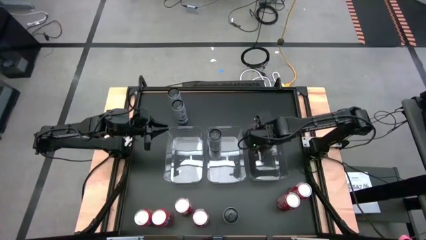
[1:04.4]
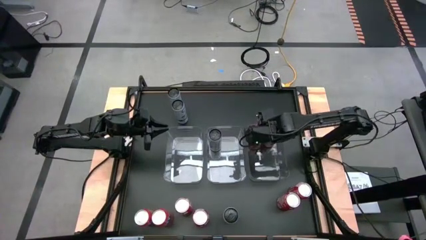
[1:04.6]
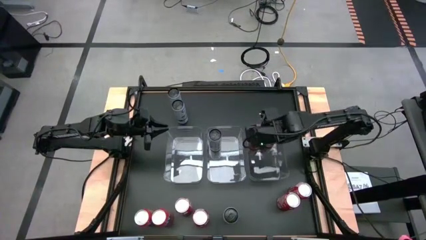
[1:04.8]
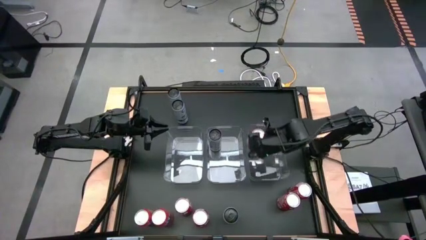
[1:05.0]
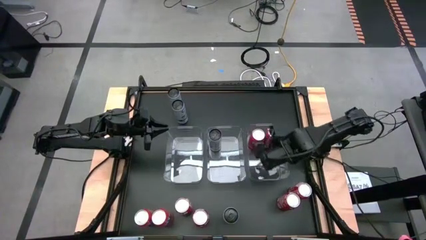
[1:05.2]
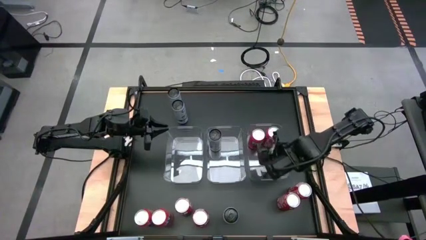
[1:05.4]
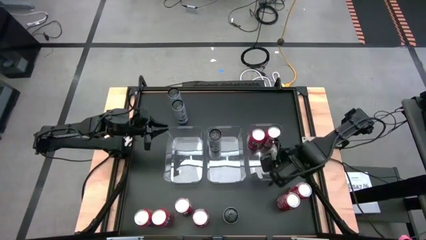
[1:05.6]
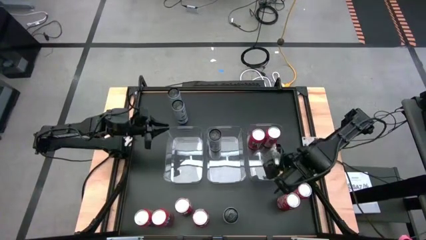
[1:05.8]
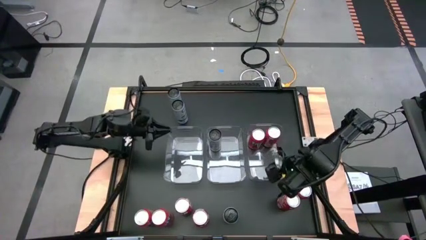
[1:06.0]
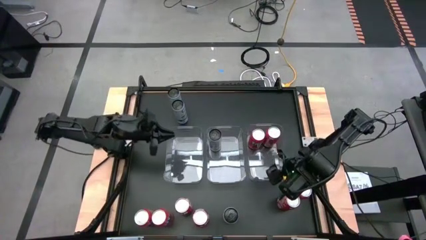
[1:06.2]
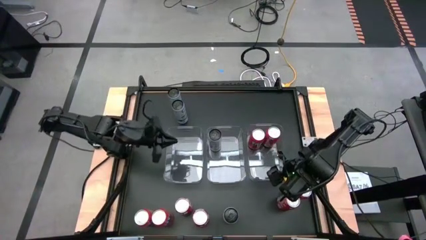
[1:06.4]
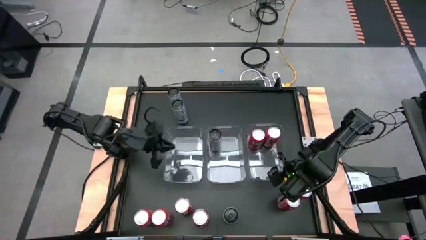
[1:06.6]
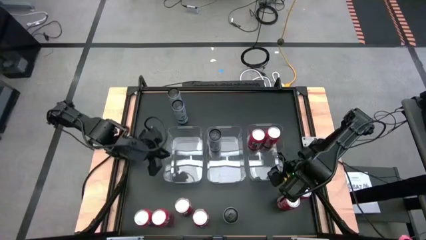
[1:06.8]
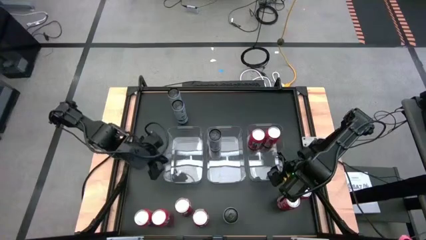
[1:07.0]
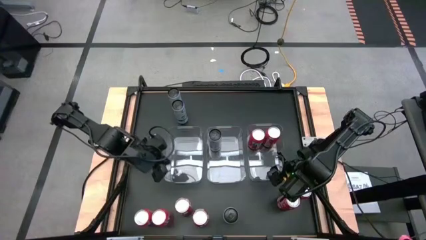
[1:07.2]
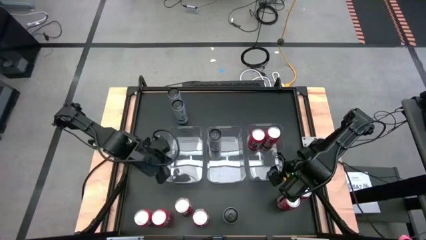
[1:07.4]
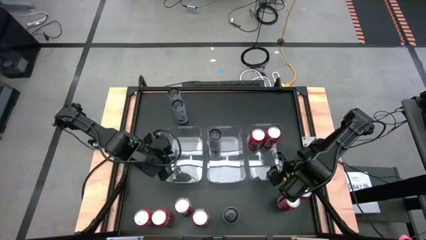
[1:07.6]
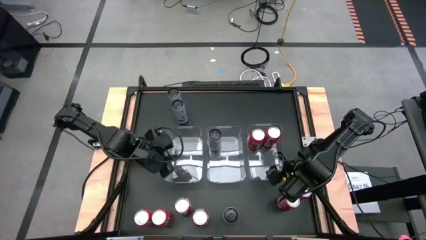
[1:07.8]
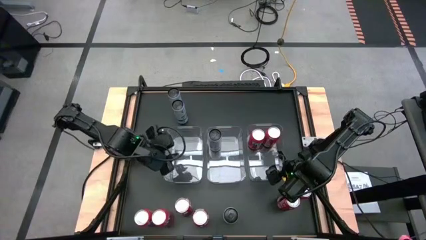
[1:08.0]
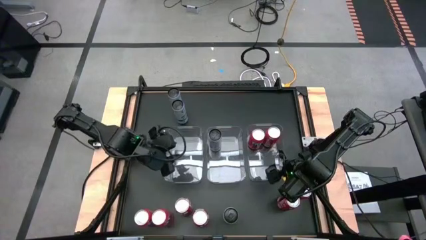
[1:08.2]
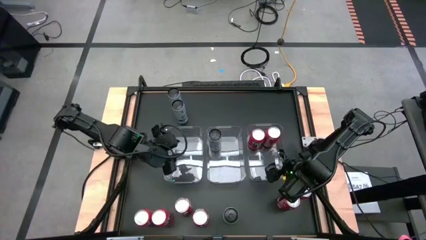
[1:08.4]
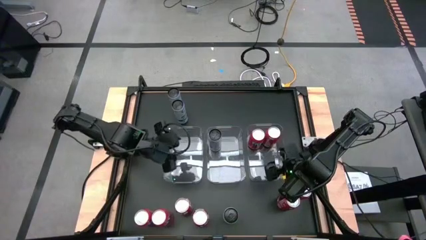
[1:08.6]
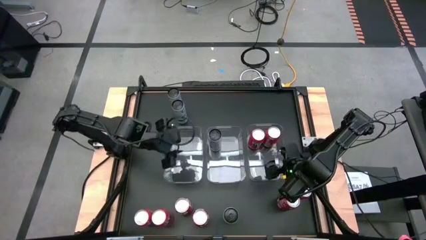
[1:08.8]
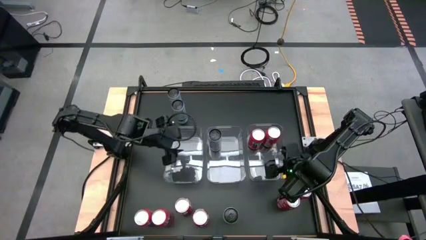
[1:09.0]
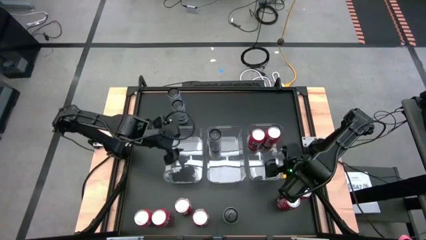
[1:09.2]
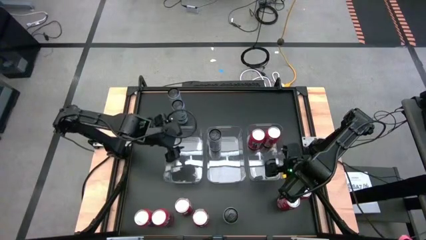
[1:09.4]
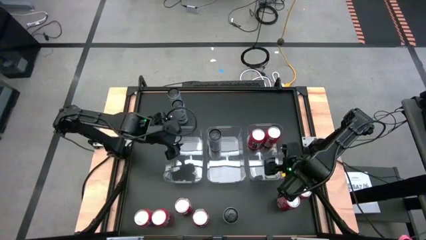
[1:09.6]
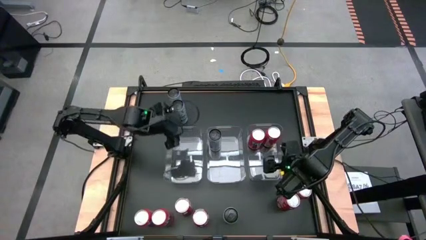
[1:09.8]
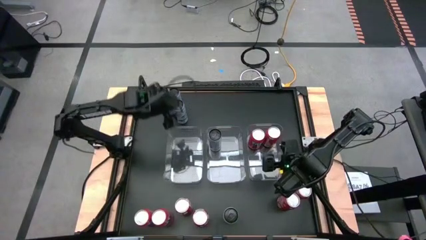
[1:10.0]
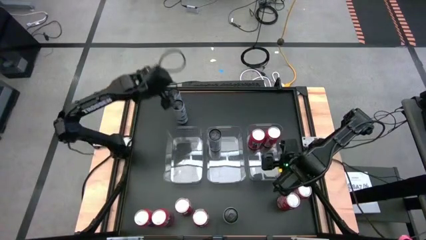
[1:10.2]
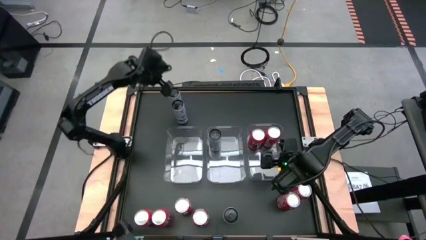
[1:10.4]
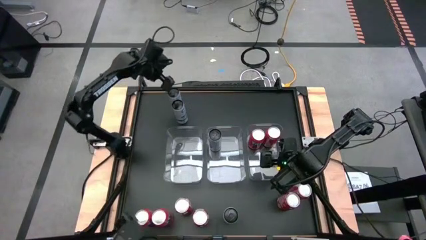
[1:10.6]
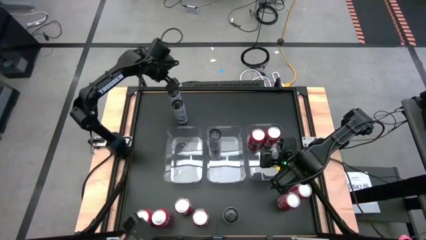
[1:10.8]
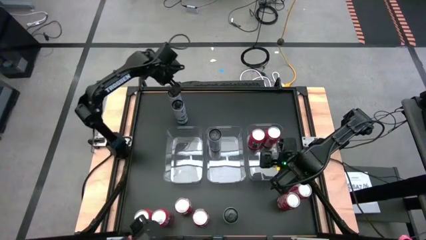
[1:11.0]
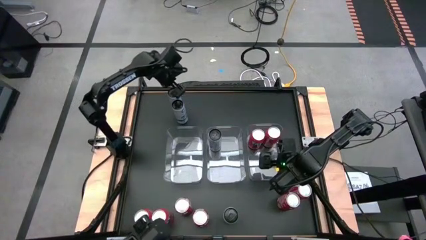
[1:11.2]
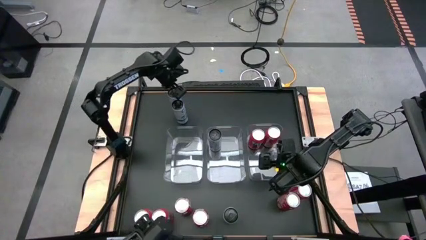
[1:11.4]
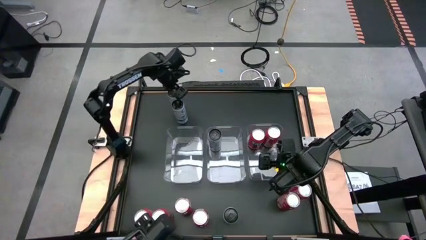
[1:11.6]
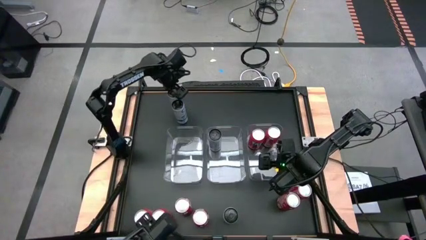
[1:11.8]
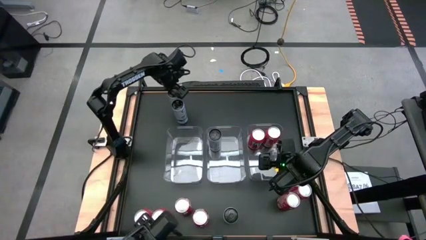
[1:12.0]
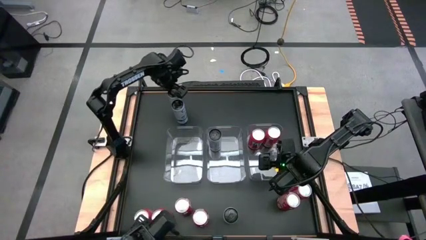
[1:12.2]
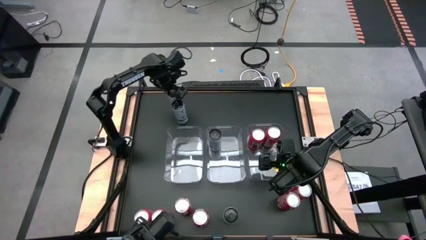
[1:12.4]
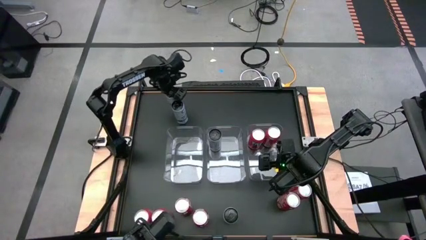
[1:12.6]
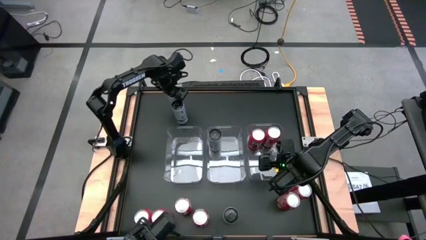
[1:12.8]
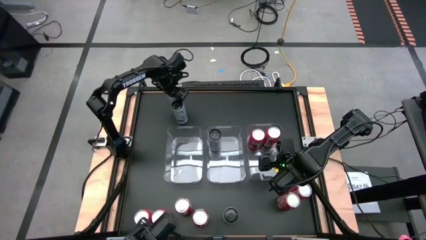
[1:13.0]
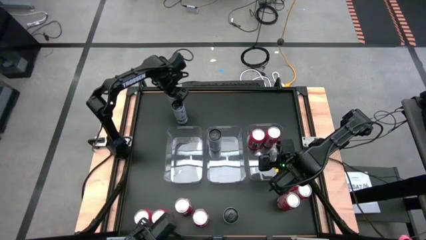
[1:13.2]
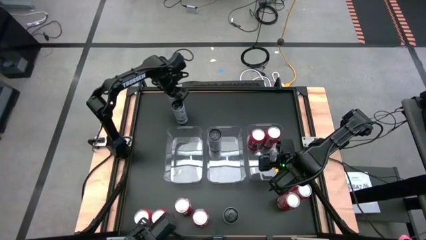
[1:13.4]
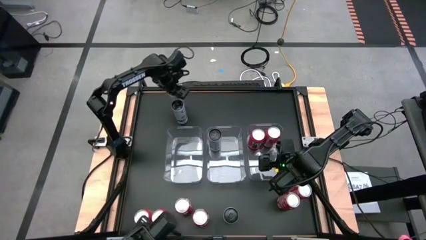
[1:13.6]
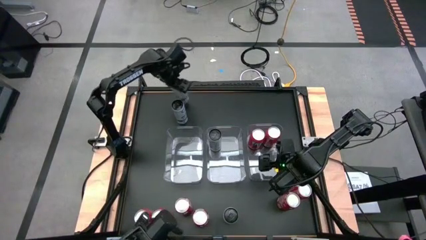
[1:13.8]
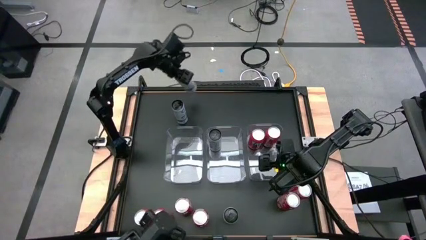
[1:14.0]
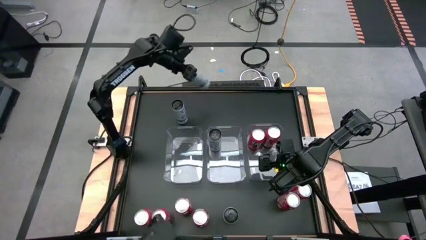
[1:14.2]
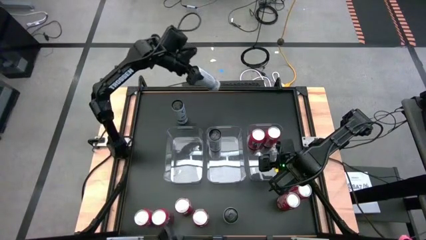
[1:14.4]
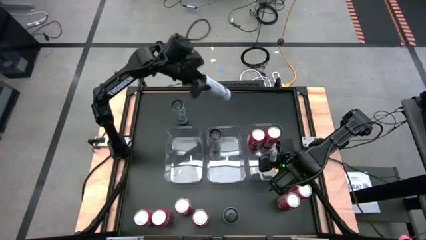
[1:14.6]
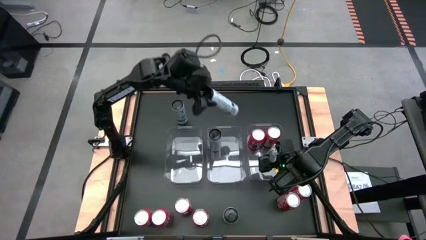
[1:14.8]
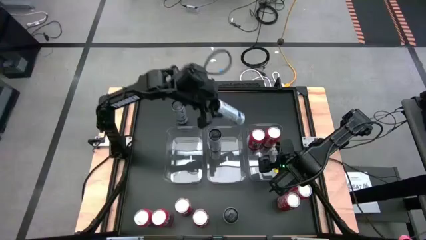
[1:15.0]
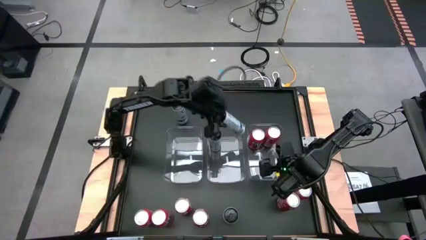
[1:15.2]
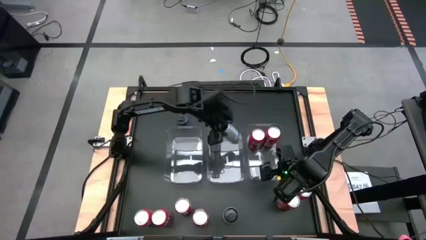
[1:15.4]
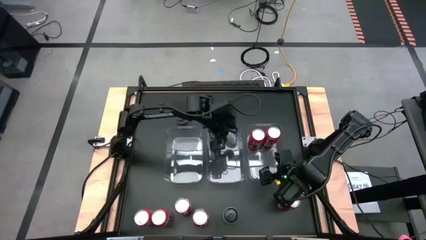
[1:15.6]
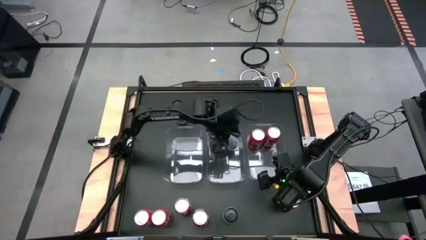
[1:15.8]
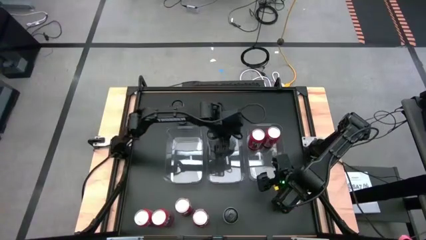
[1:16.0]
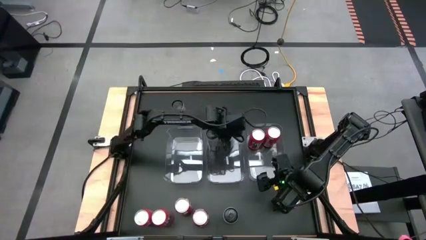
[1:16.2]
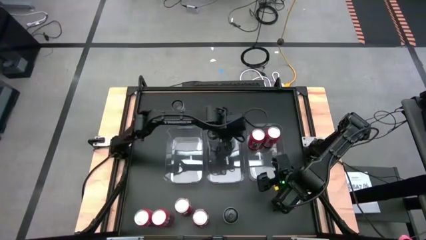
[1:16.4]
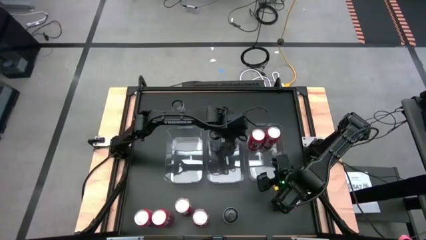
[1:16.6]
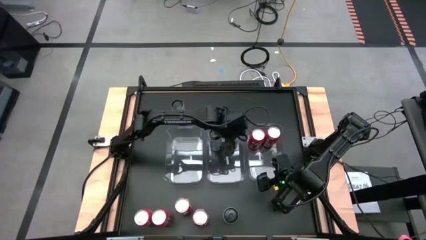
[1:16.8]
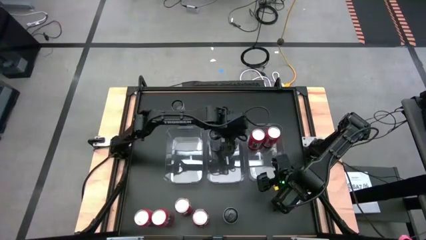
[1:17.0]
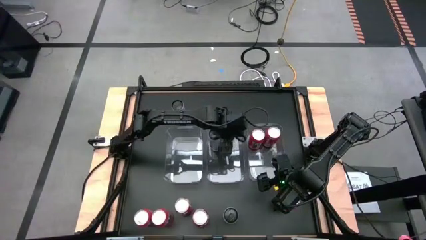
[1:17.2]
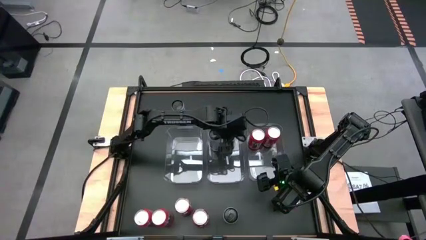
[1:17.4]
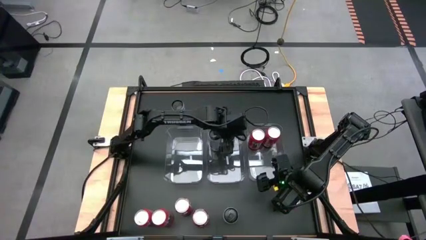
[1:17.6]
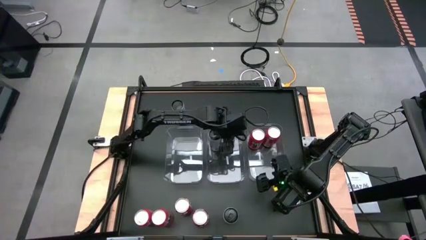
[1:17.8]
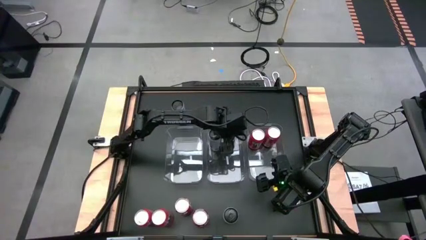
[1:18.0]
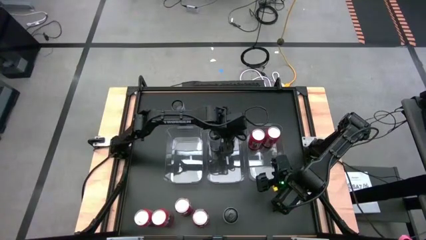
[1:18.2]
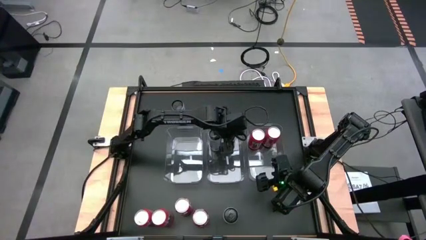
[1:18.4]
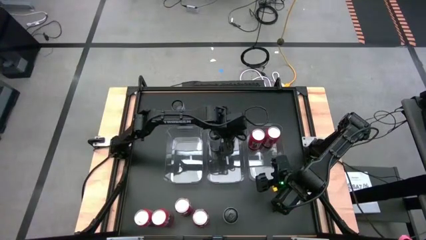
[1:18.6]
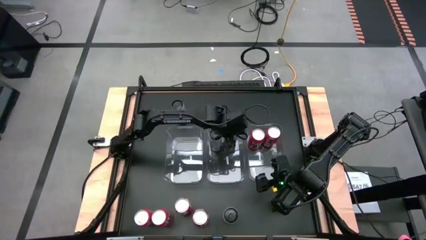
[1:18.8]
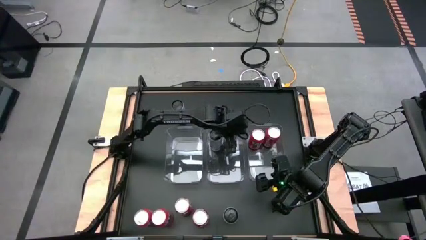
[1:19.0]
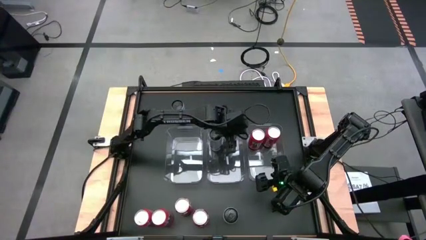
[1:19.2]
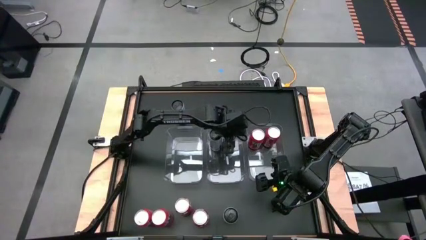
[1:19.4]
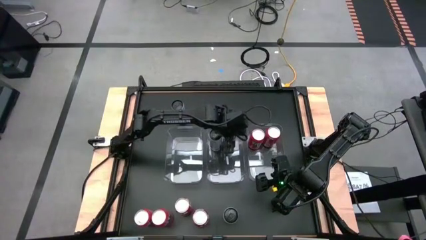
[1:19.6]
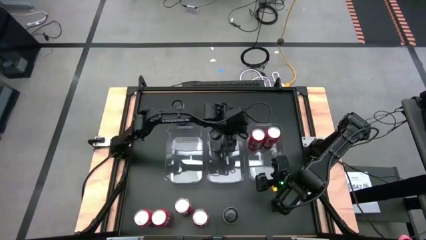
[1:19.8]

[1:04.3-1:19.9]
Task: Sort soda cans
Put the top white soda can into the center transparent bin
